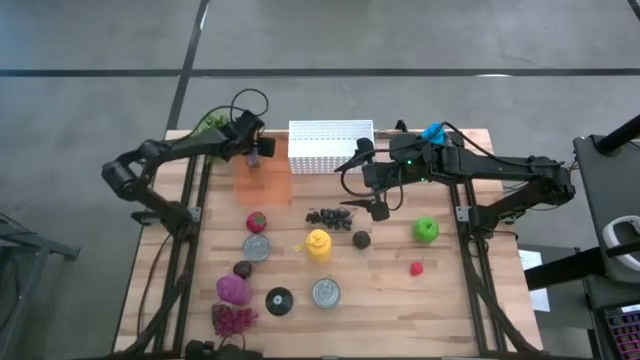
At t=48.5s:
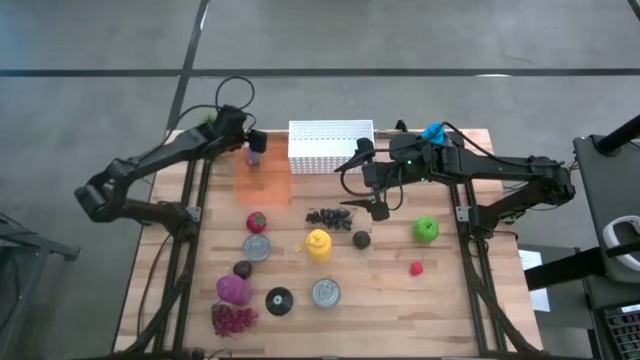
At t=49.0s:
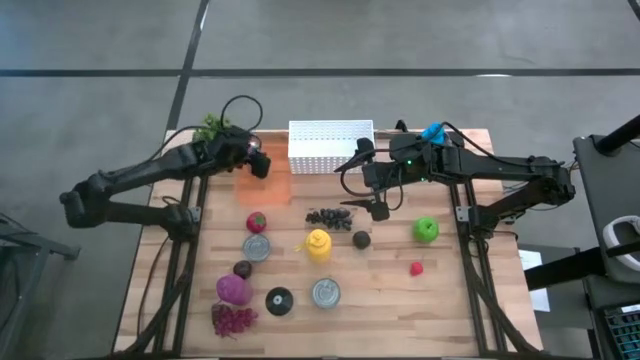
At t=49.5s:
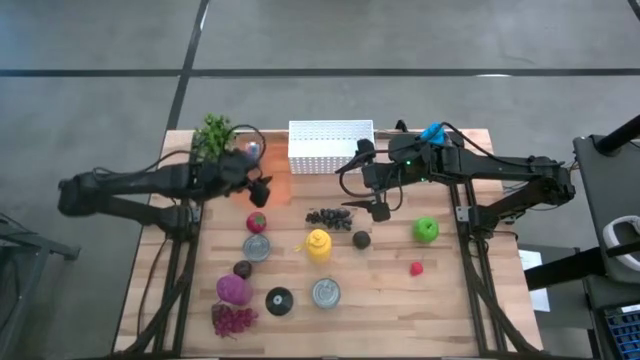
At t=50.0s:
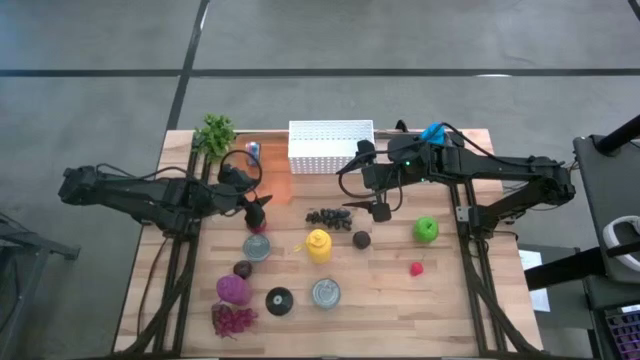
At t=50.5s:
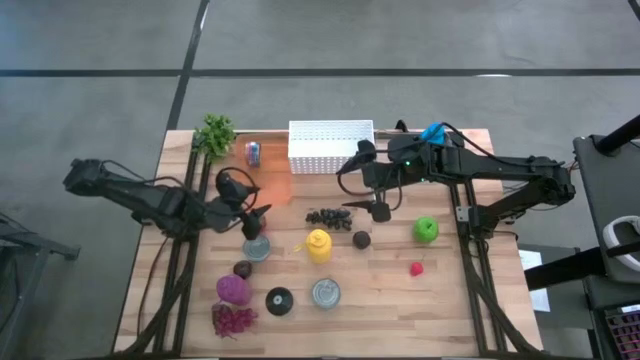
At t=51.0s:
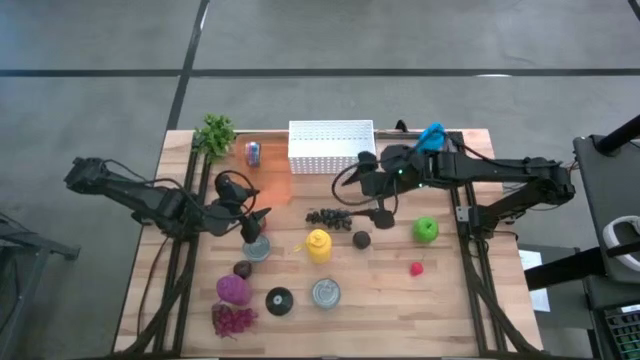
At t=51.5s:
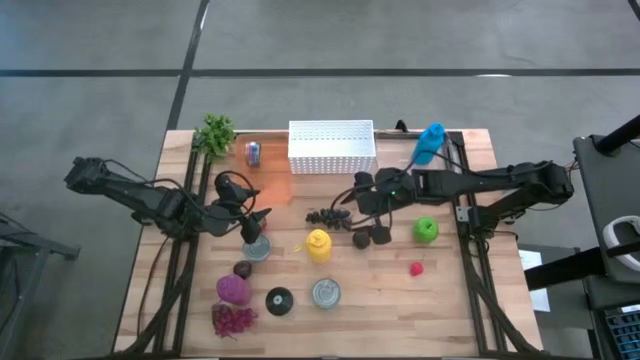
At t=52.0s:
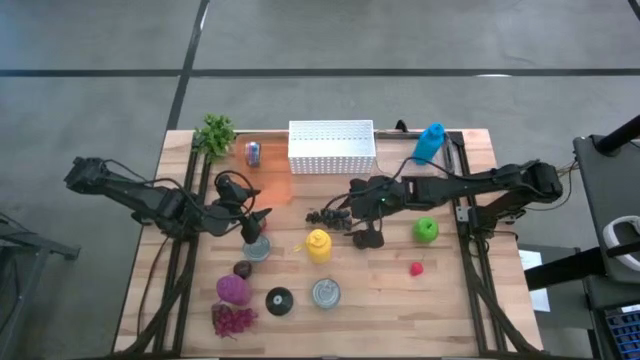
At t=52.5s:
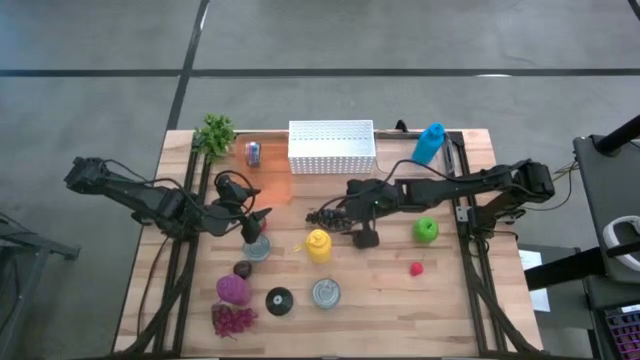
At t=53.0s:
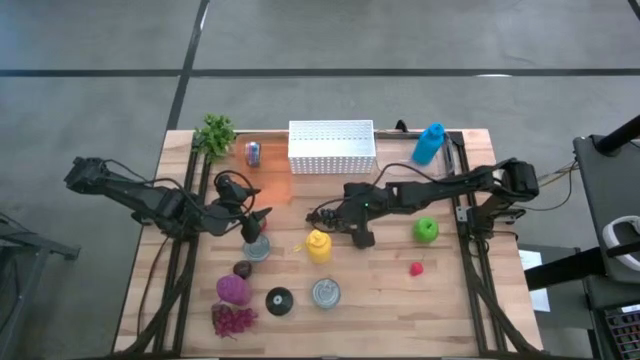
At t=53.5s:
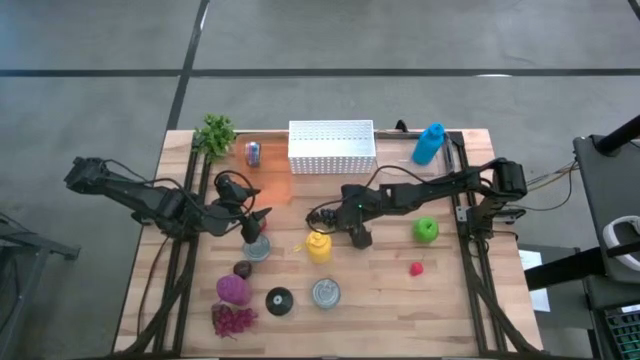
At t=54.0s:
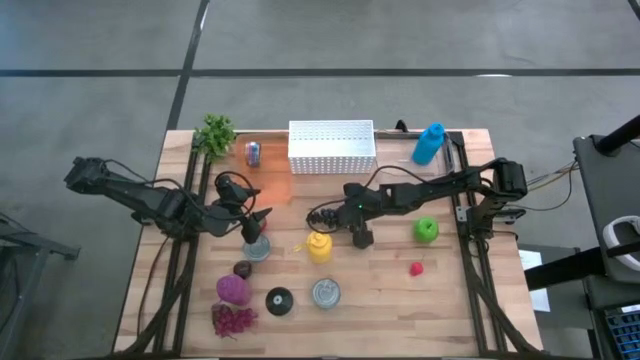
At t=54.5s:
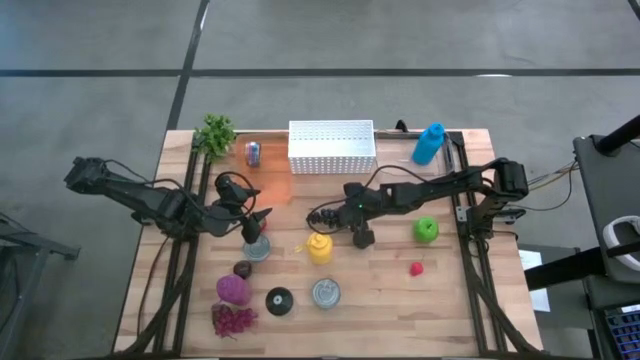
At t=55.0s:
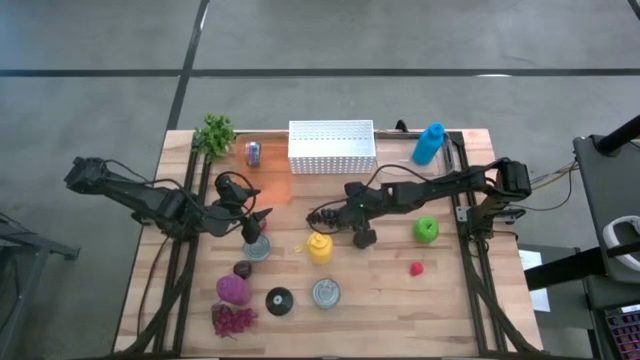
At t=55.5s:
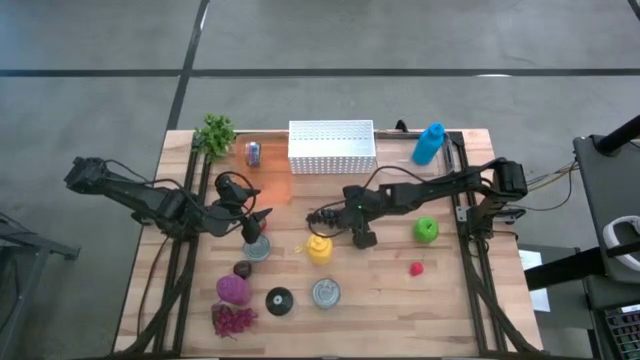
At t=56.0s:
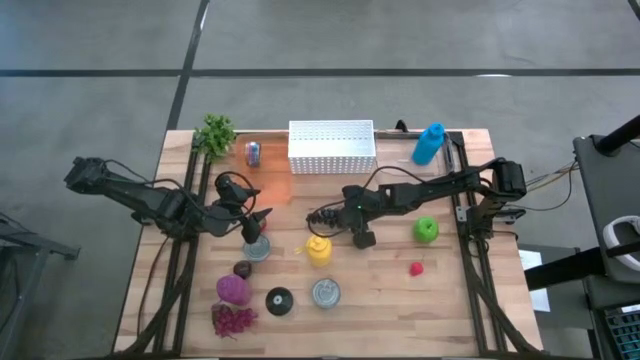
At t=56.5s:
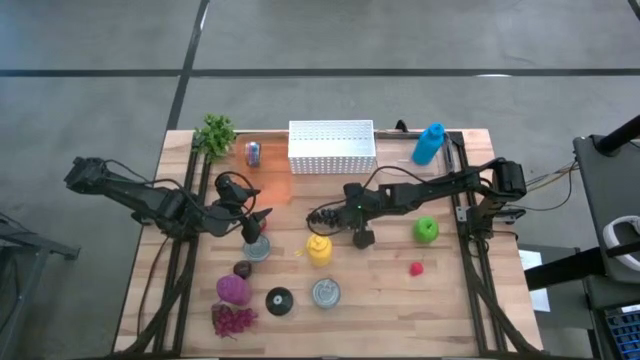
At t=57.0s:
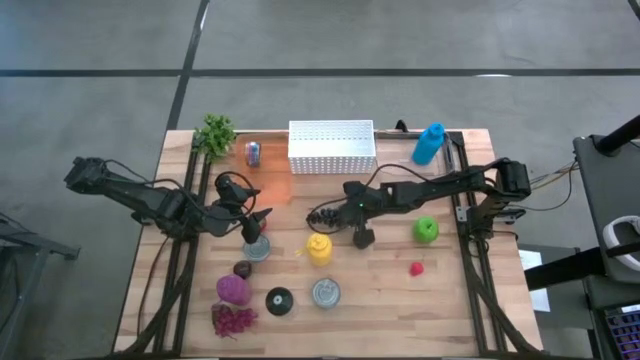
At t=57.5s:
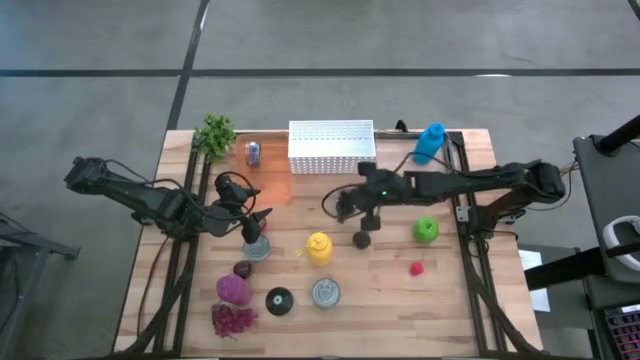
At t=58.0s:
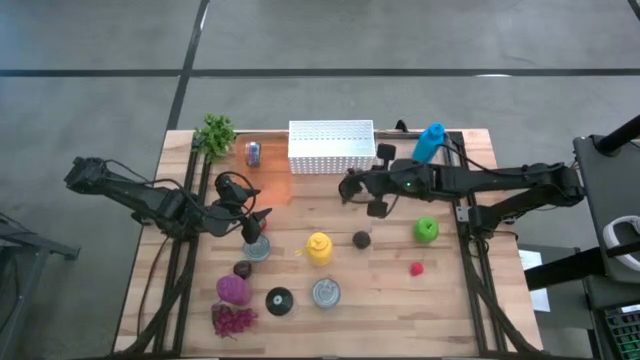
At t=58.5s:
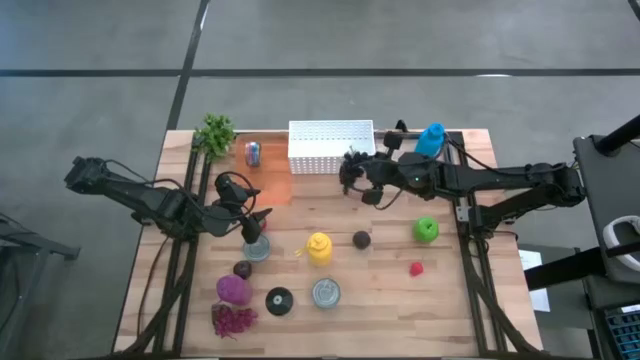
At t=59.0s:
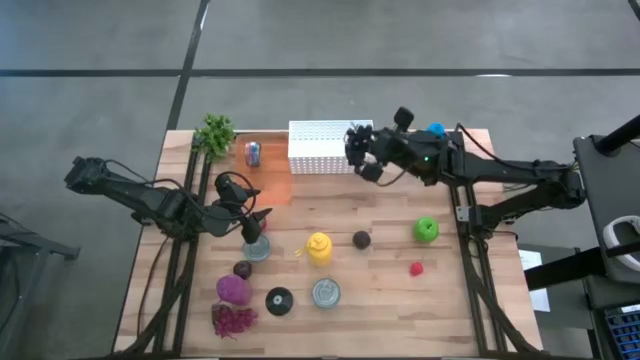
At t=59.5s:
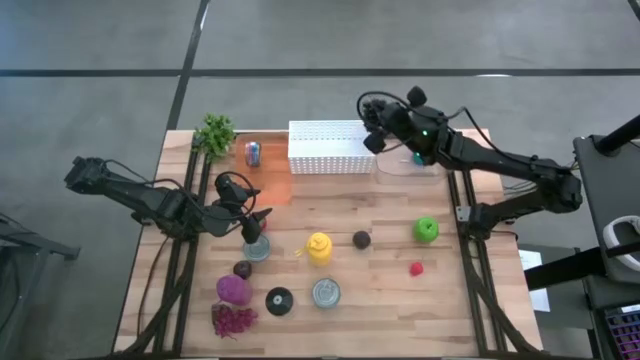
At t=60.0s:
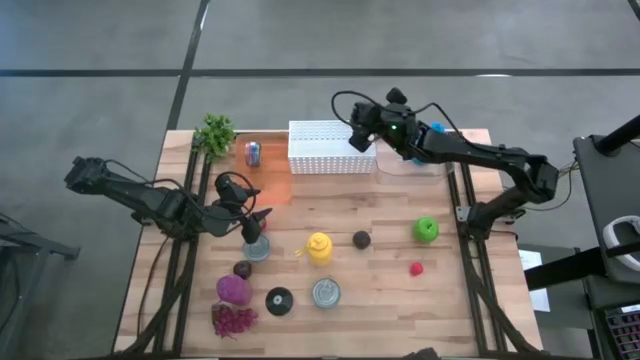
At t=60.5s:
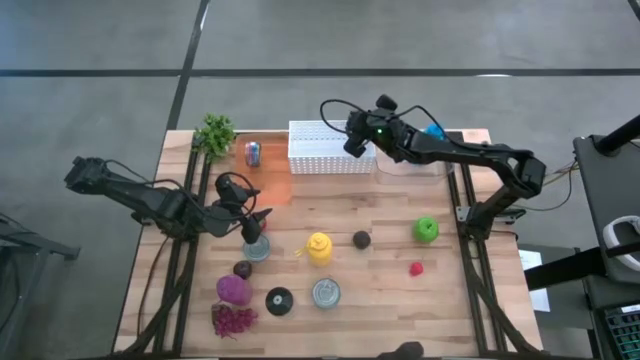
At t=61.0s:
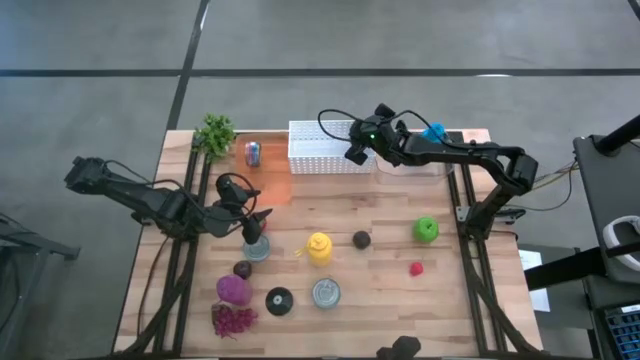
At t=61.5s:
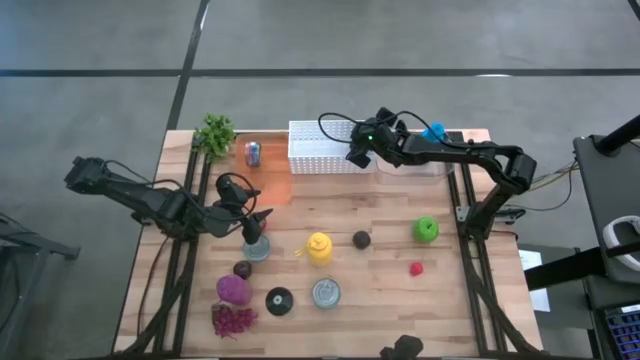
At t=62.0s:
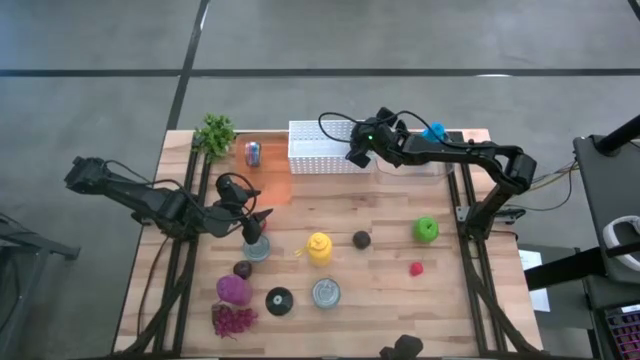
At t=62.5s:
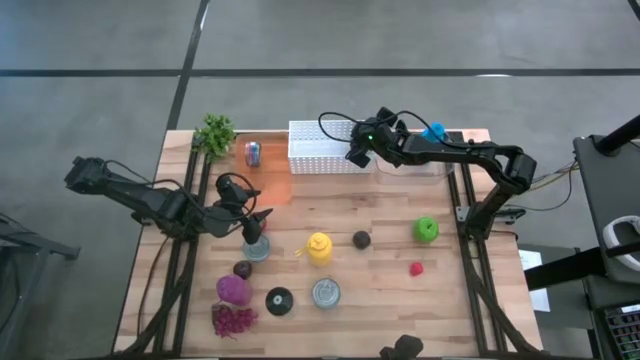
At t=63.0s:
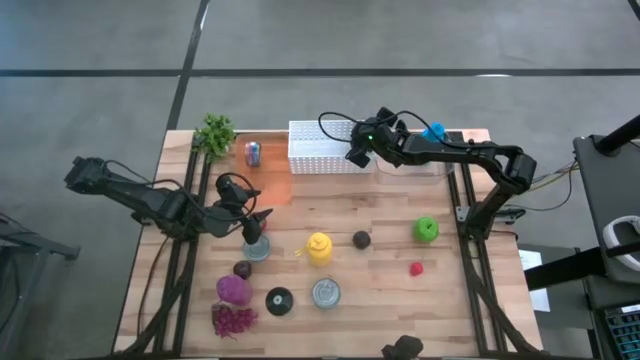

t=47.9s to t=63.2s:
Task: Pick & Place Food Item
Put the black grapes into the white bin

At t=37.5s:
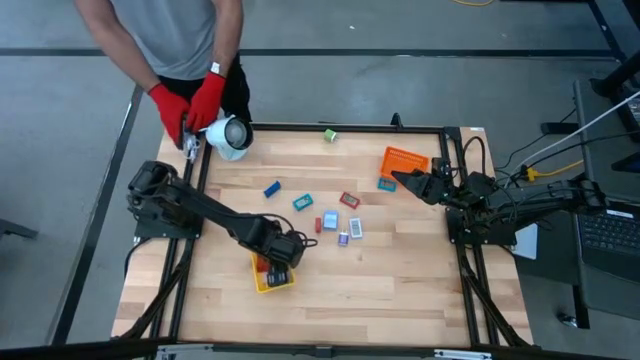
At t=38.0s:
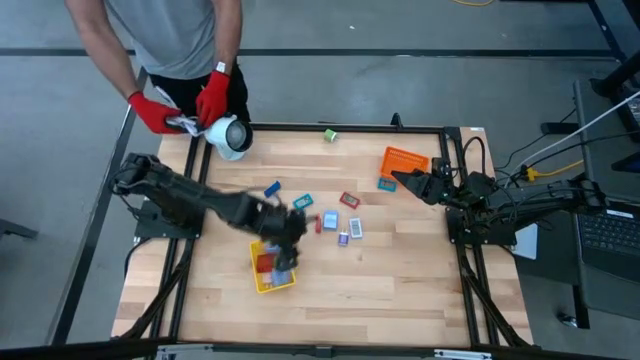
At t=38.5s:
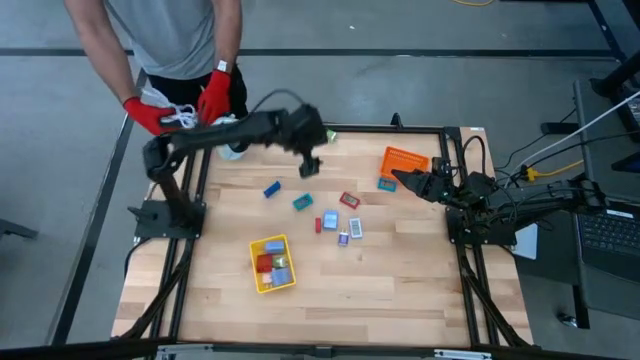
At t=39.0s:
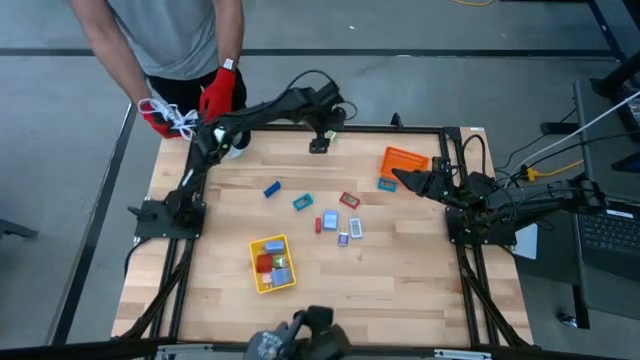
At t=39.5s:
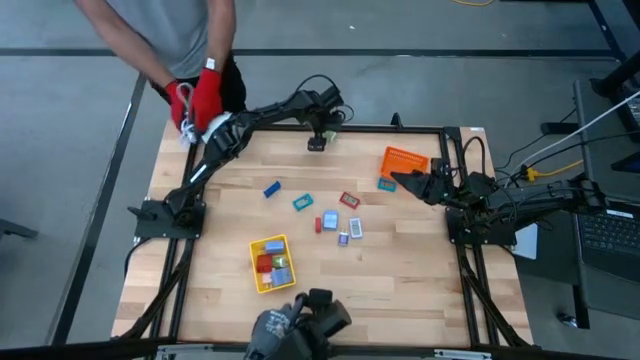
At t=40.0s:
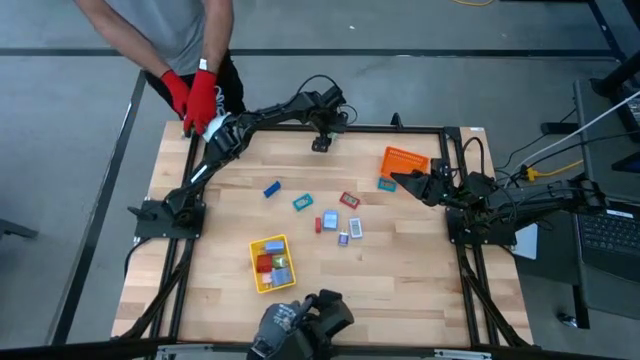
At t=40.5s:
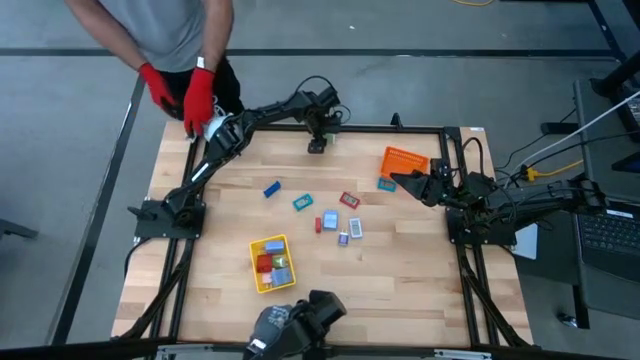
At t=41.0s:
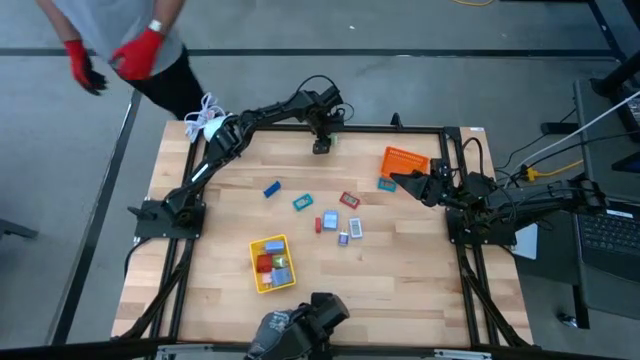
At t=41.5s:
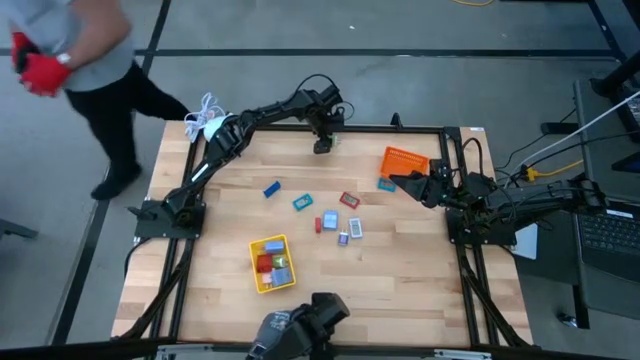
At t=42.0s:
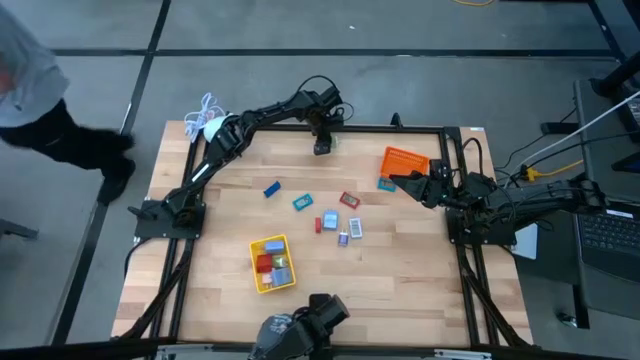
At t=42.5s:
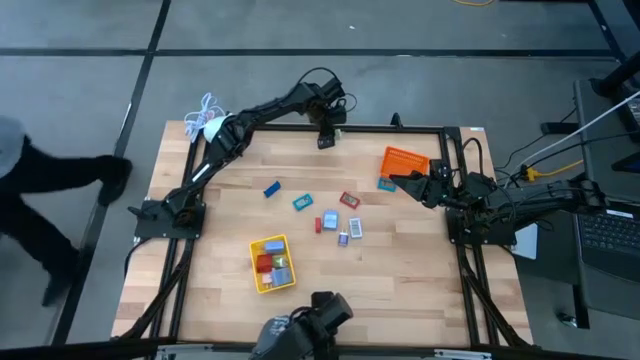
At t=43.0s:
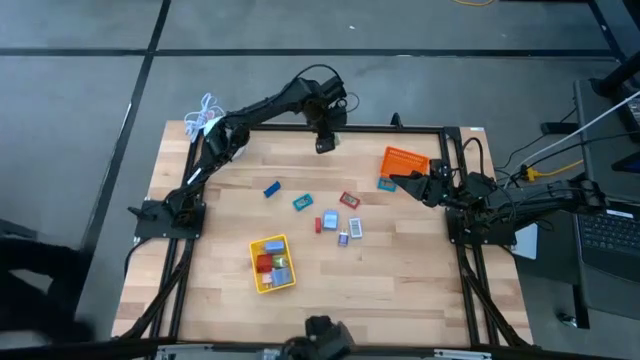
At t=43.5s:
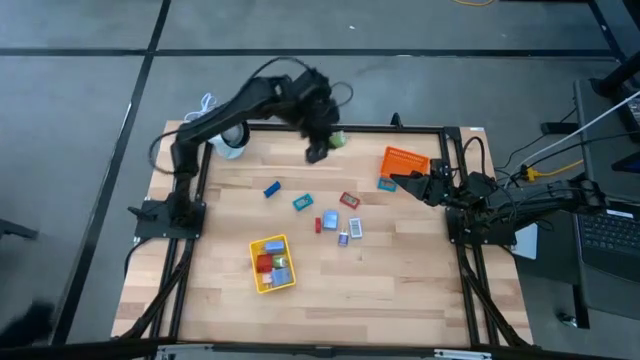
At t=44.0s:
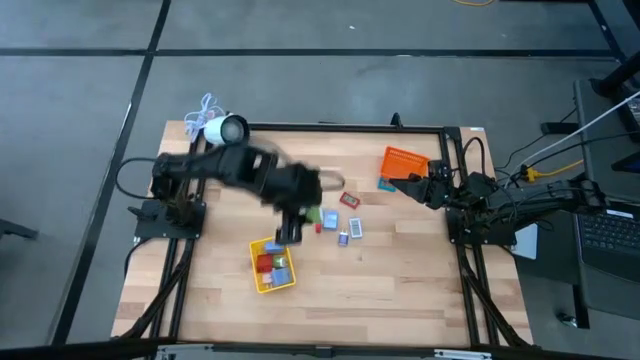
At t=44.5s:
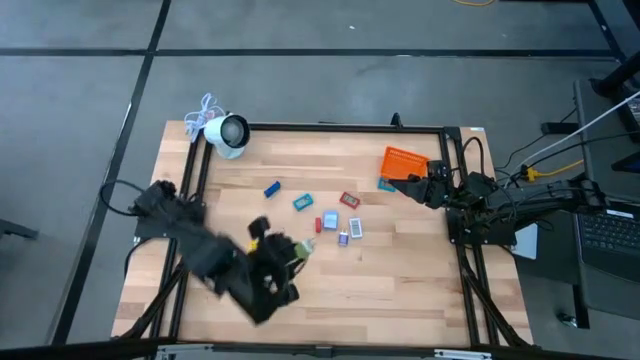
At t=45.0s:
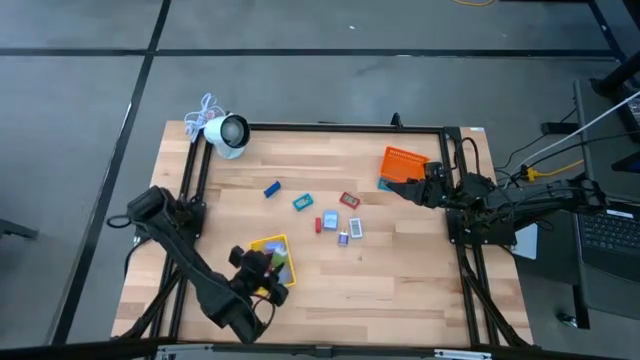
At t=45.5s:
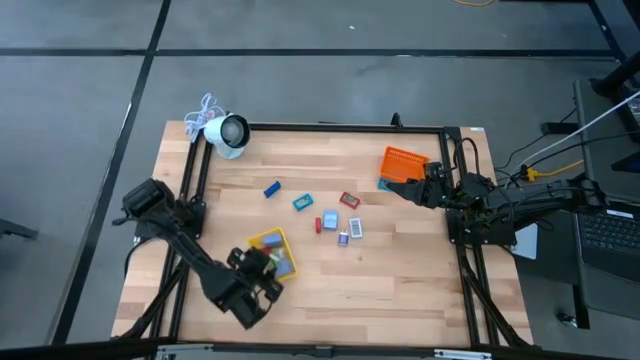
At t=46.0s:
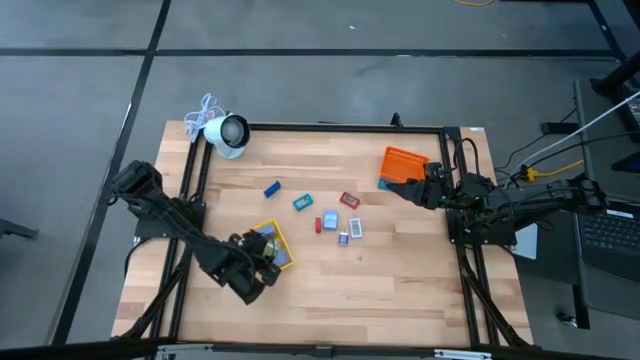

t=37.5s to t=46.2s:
Task: Pick & Place Office items
Put the green charger adapter into the yellow bin
